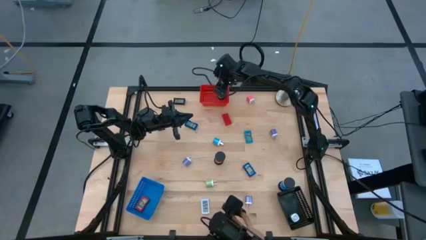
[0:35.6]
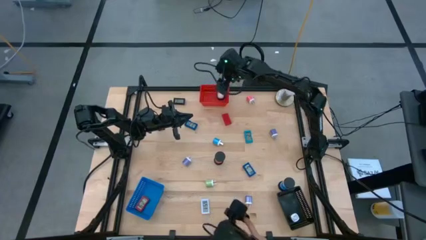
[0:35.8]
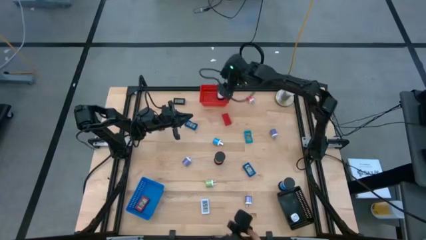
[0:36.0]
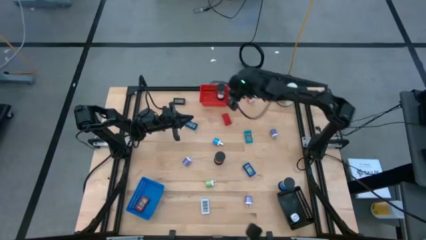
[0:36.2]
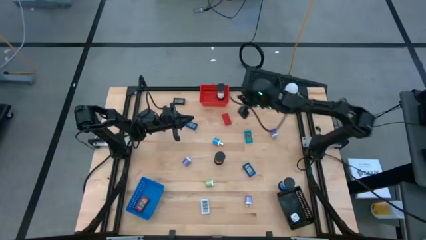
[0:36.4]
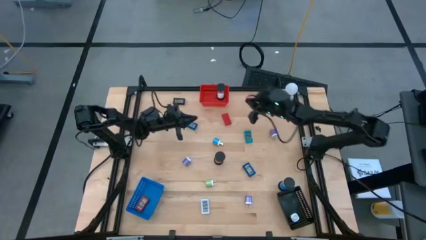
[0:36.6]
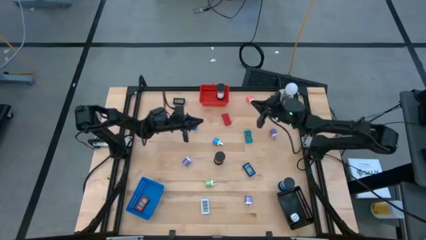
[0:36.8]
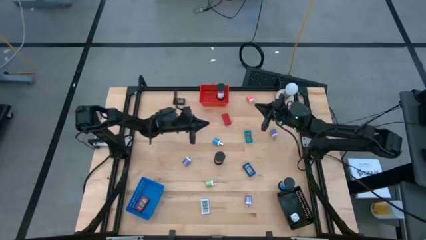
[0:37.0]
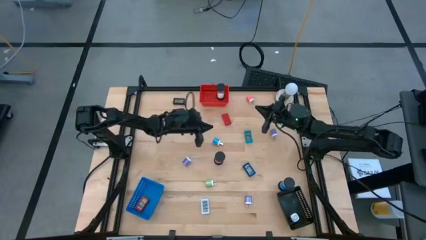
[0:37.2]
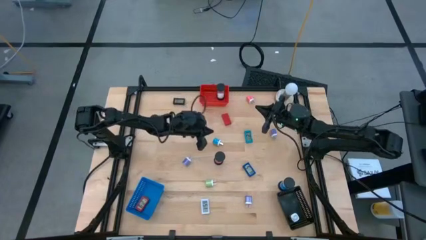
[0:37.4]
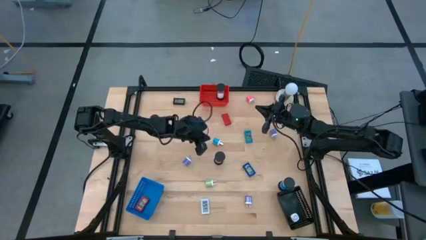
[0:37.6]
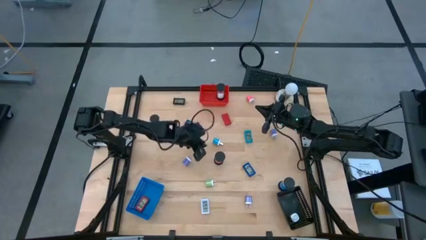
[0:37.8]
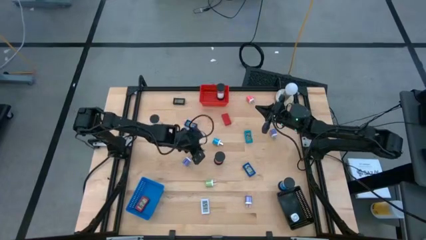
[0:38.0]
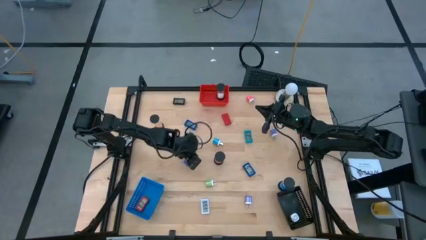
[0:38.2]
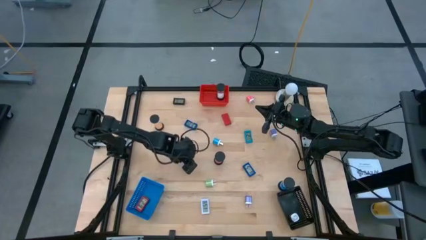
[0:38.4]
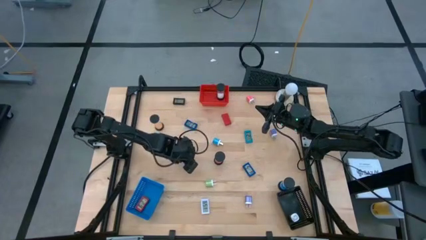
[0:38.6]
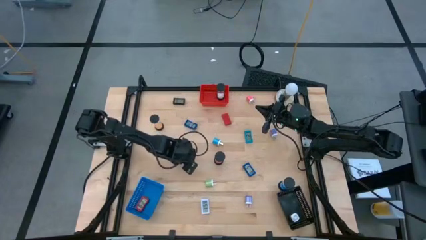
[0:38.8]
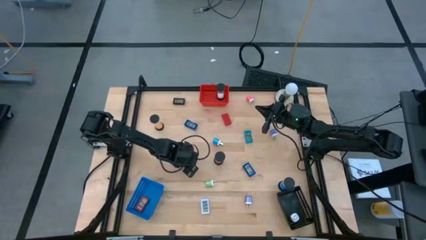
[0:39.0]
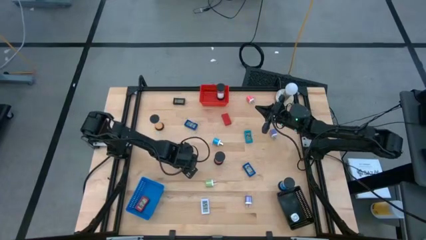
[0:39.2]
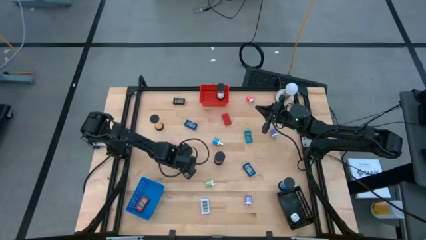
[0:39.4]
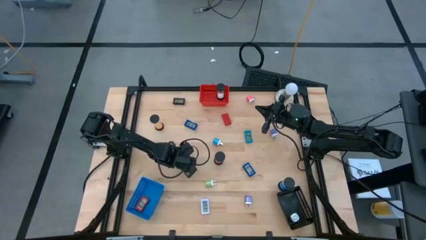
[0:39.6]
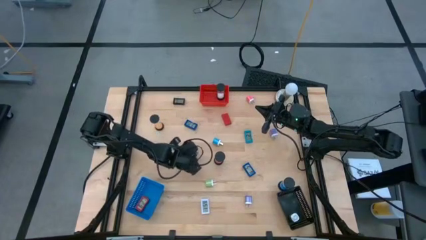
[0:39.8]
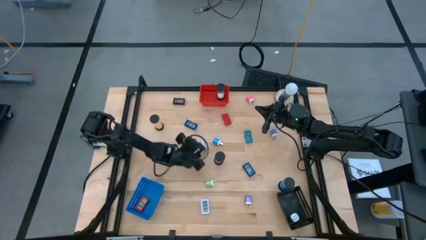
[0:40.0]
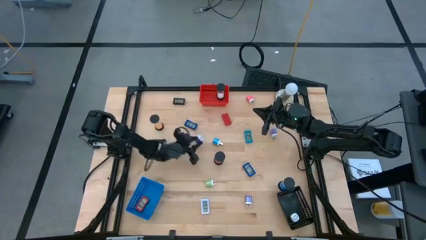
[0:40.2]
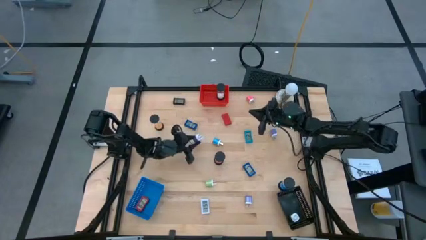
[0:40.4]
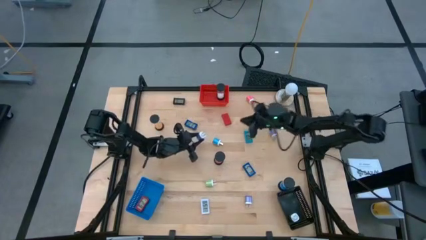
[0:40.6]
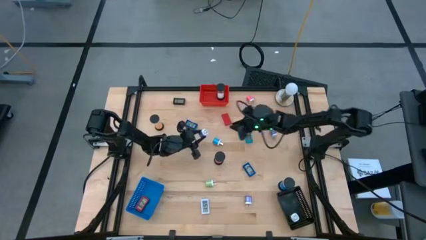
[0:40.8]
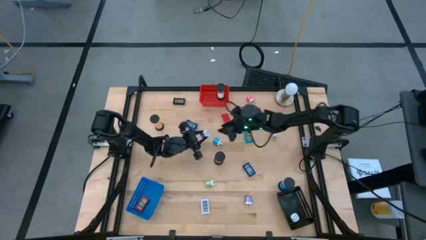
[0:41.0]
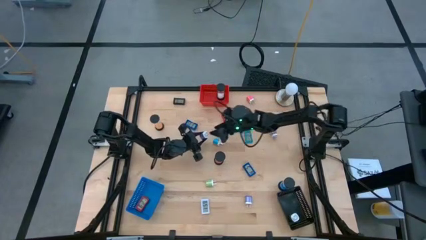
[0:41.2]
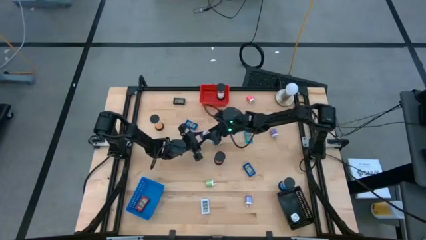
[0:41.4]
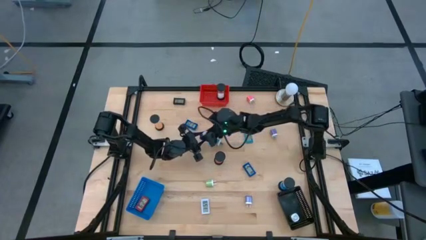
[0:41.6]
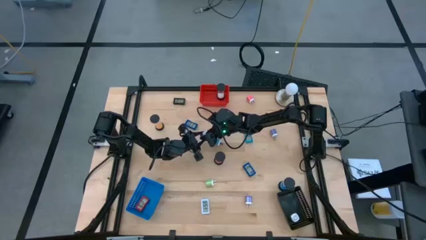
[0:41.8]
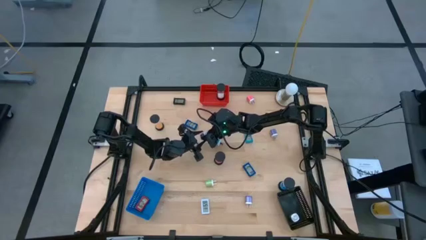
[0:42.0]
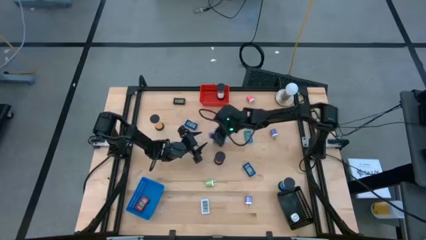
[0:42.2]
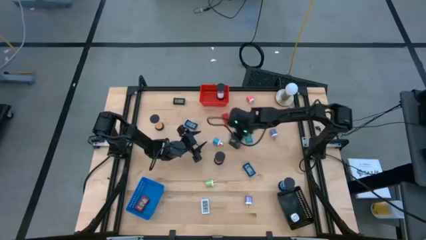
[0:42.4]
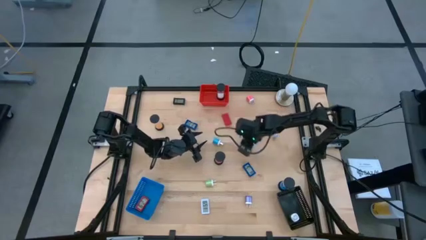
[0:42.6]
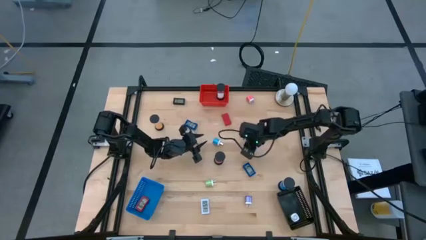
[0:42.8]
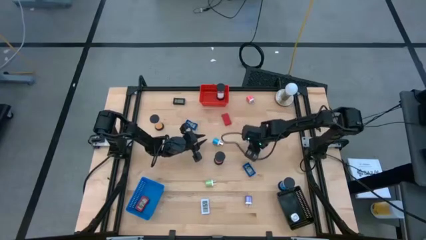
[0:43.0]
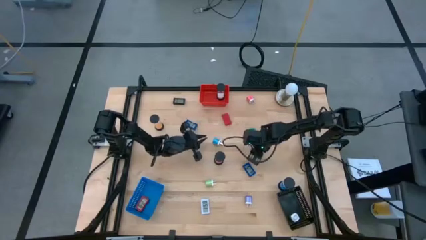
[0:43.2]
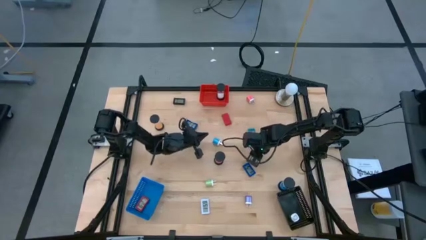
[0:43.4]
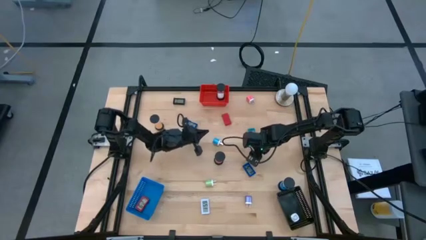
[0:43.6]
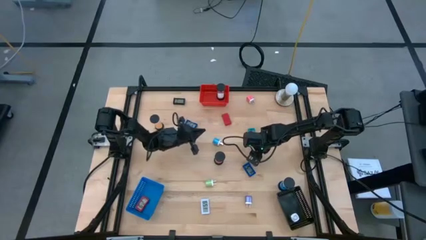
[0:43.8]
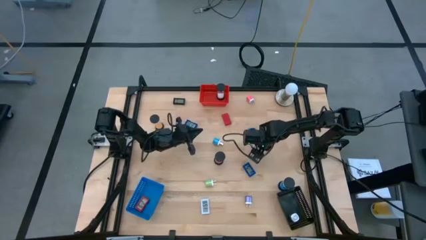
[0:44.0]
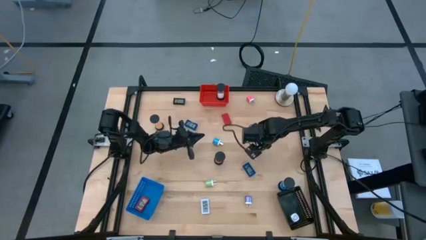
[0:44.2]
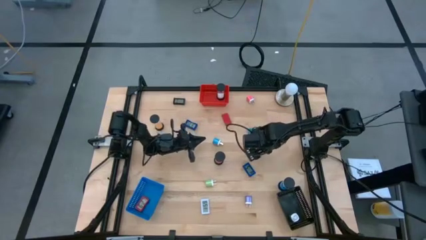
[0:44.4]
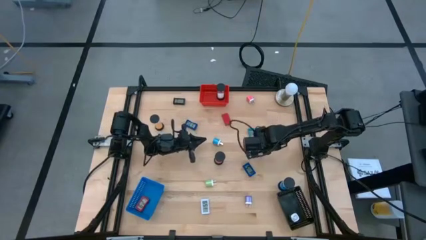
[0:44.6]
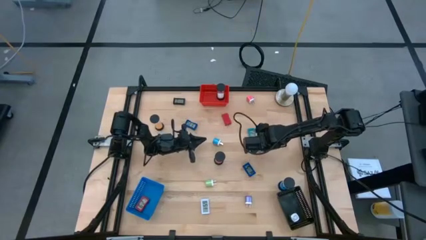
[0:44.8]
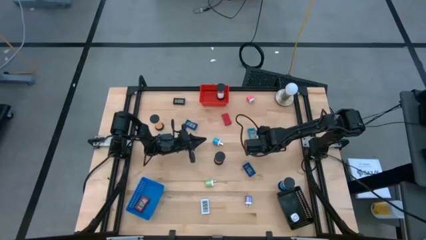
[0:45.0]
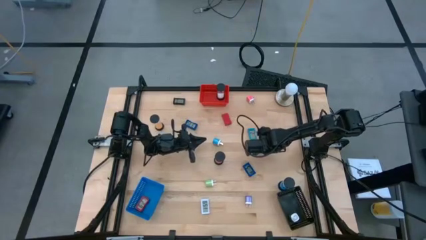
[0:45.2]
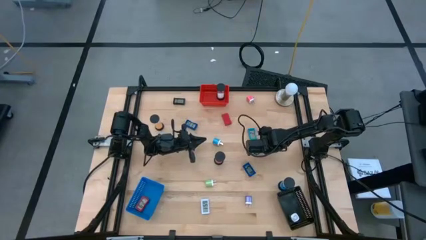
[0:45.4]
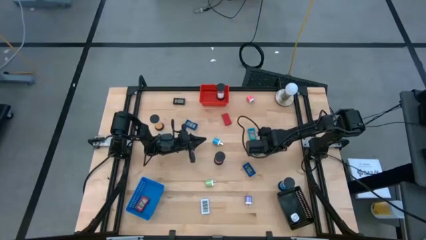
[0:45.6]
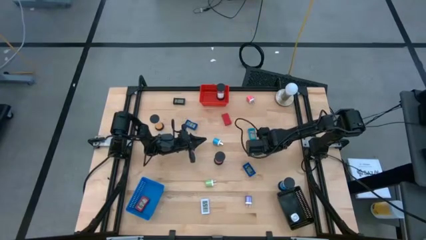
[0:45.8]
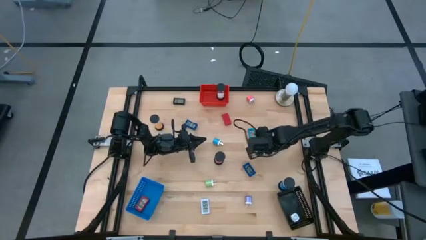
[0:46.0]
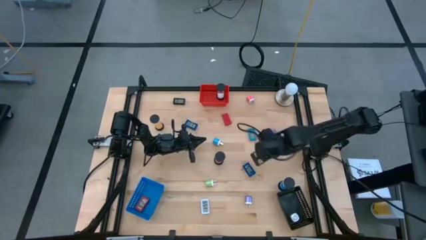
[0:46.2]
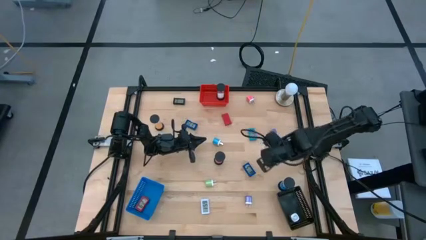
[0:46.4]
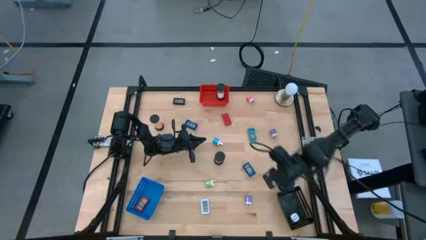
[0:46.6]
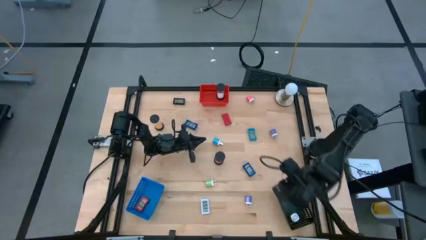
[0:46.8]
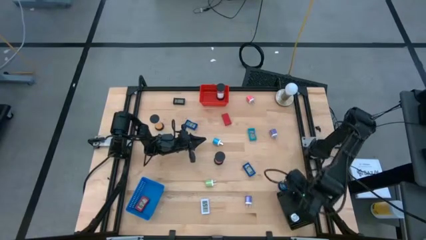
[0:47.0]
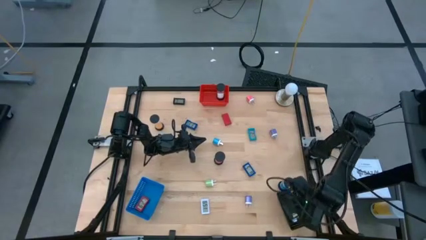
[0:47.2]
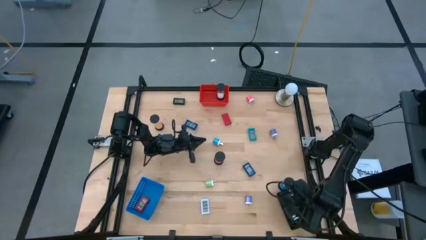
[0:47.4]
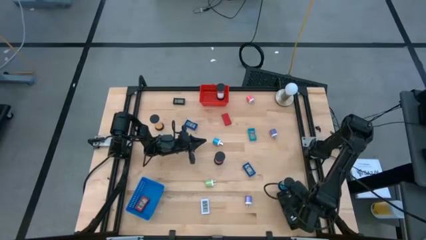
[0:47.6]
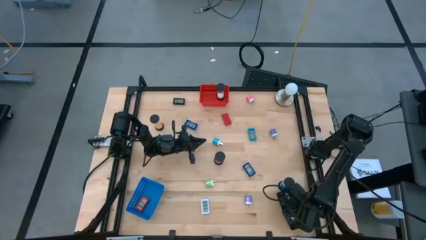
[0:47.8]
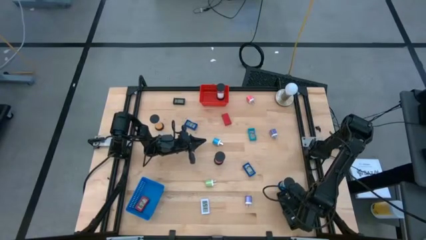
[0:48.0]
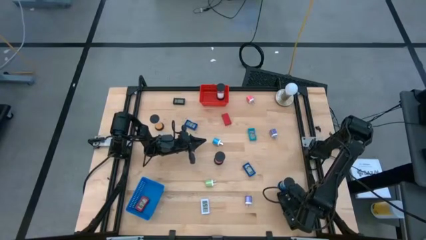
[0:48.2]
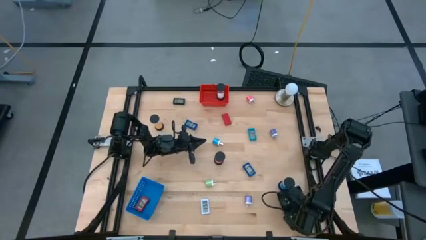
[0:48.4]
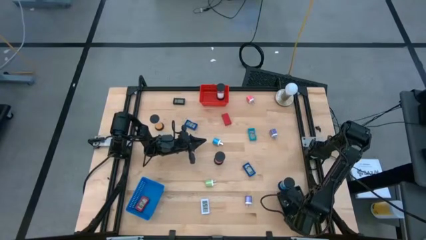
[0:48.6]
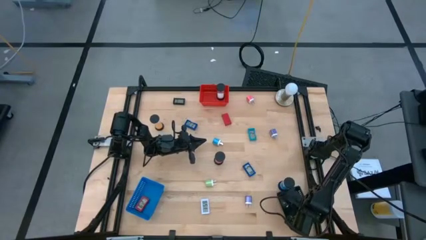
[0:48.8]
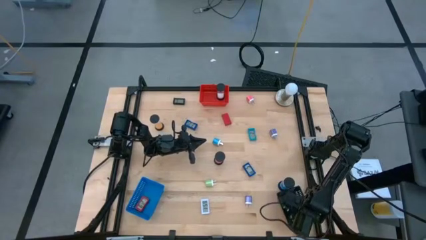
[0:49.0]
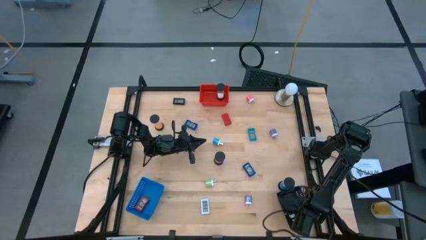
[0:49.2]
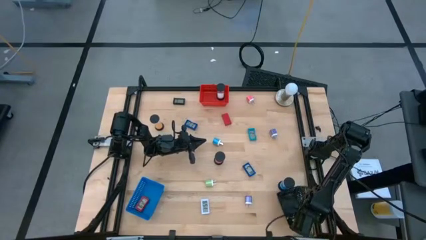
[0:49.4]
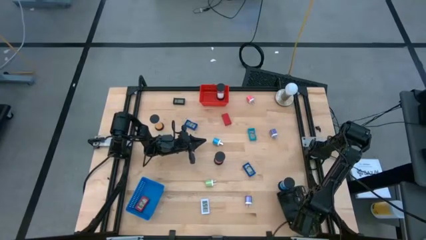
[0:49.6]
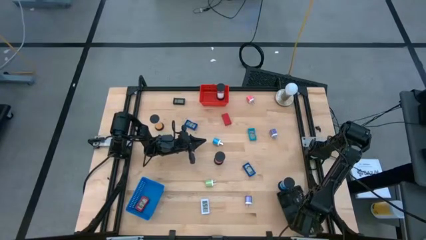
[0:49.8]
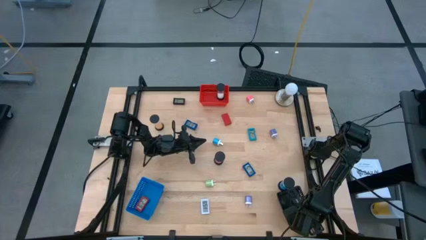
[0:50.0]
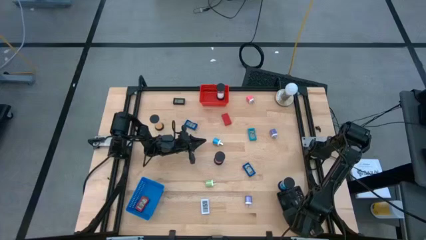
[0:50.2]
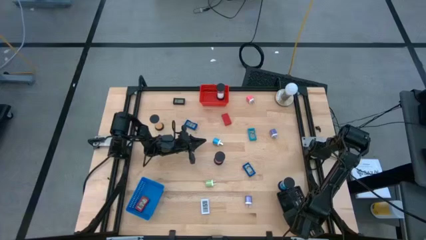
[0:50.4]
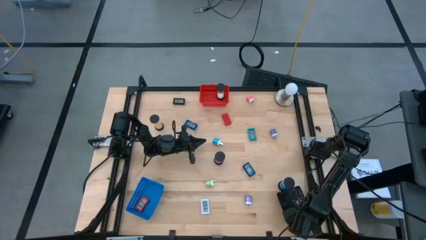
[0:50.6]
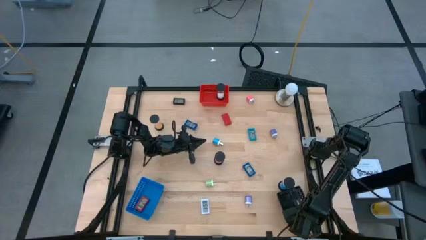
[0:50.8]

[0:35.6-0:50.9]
Task: Pick & Place Office items
Put the middle dark blue charger adapter into the black bin
